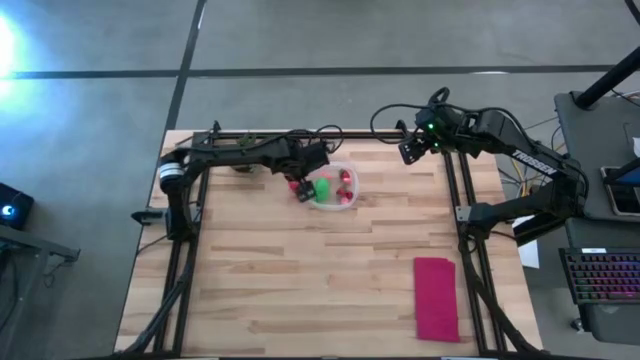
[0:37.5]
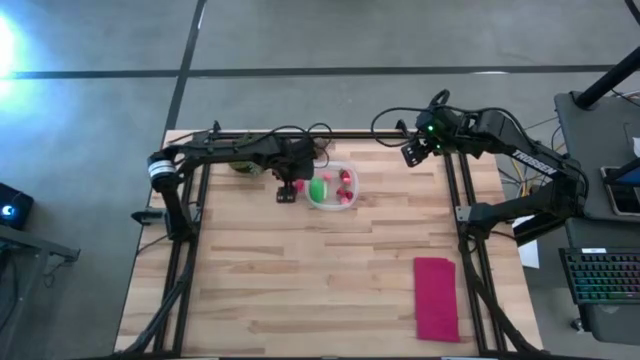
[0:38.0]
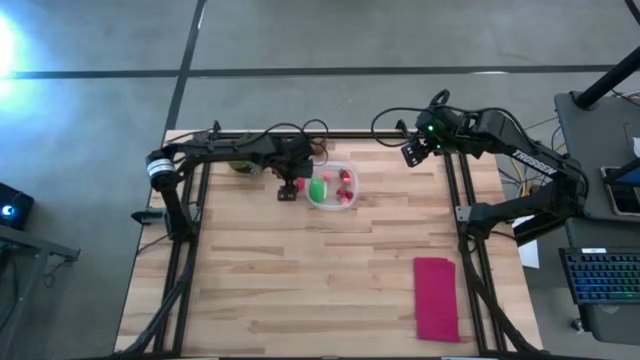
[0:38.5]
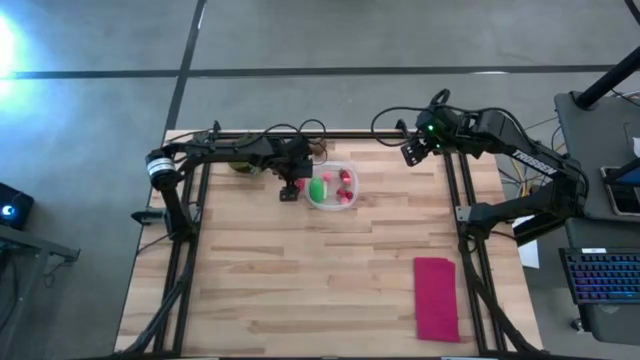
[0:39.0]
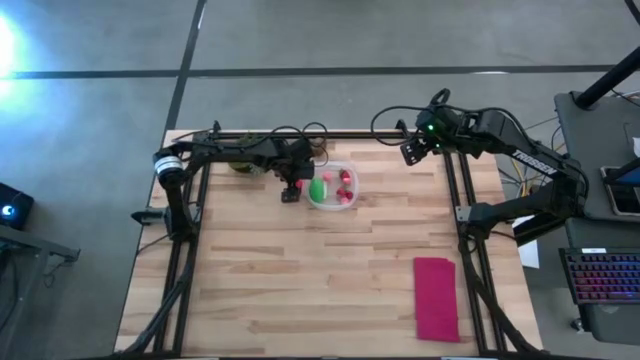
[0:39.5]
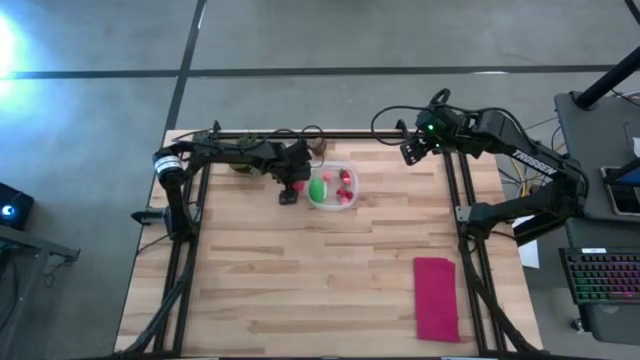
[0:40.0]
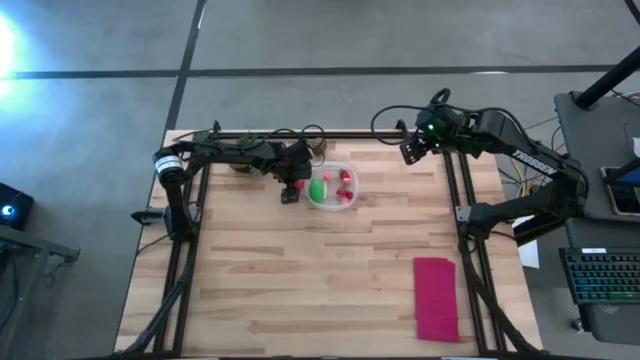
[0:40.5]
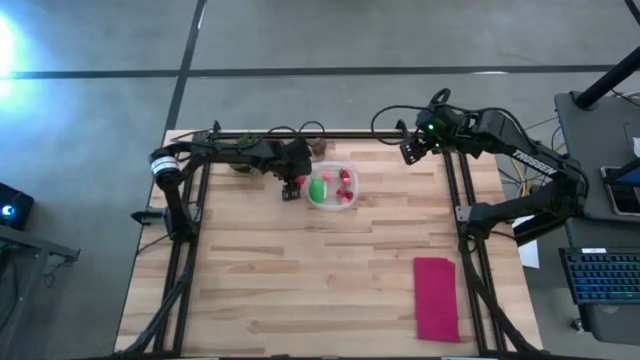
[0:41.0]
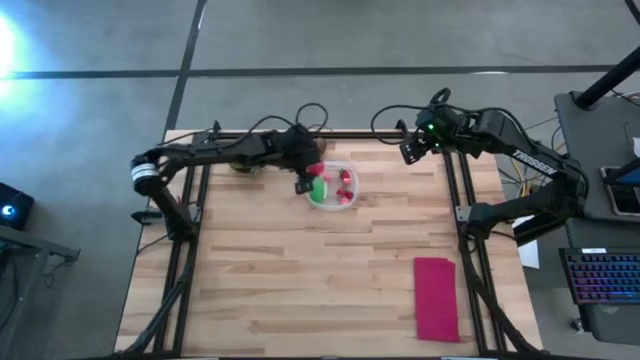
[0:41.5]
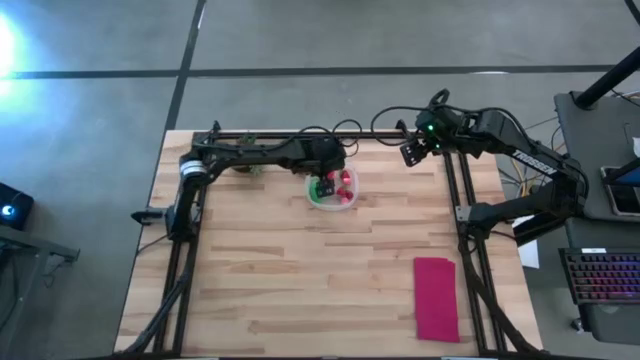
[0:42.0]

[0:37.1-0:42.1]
Task: Pick and placing Produce into tupperware
Put the tomato into the transparent bin

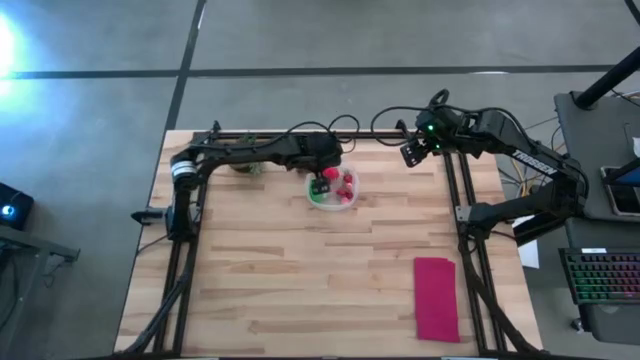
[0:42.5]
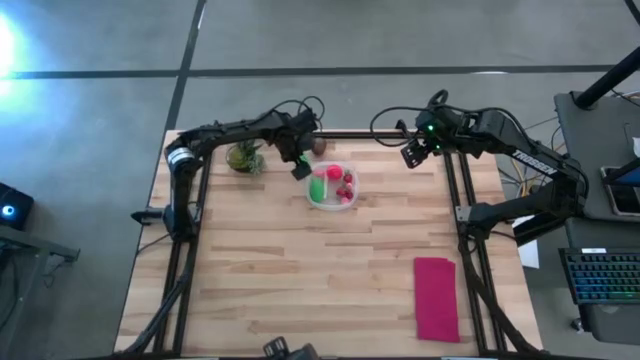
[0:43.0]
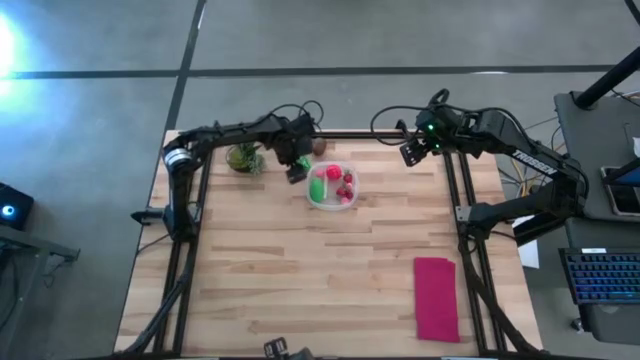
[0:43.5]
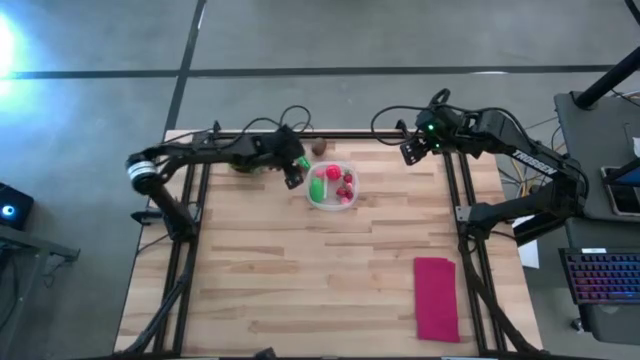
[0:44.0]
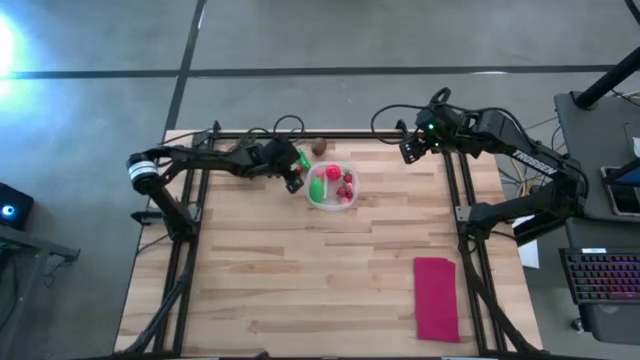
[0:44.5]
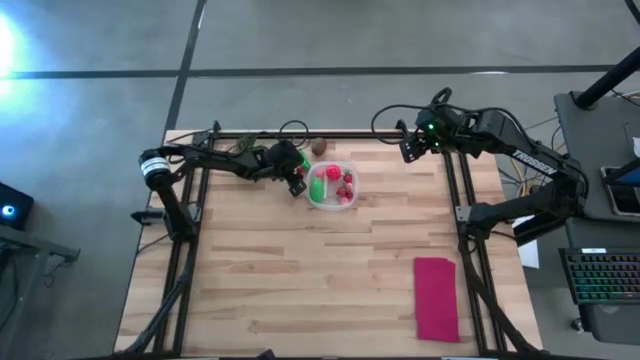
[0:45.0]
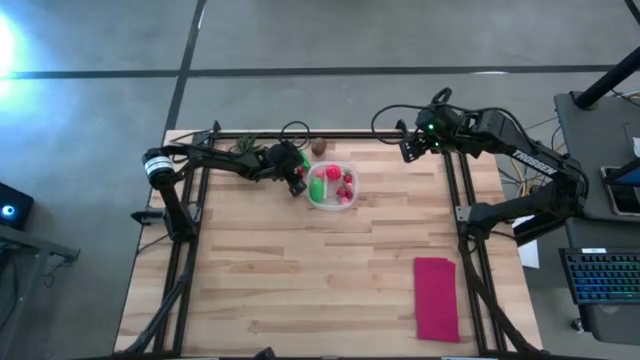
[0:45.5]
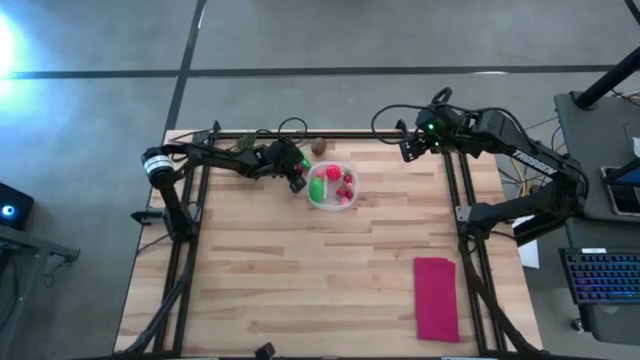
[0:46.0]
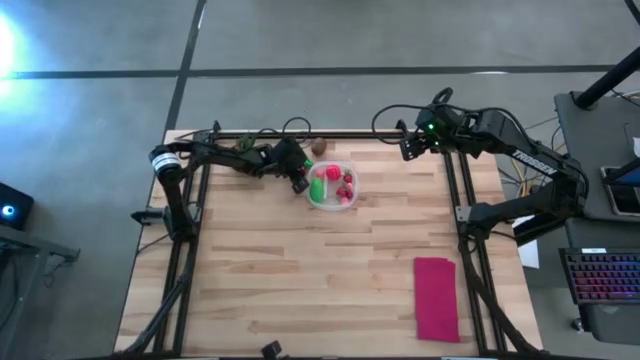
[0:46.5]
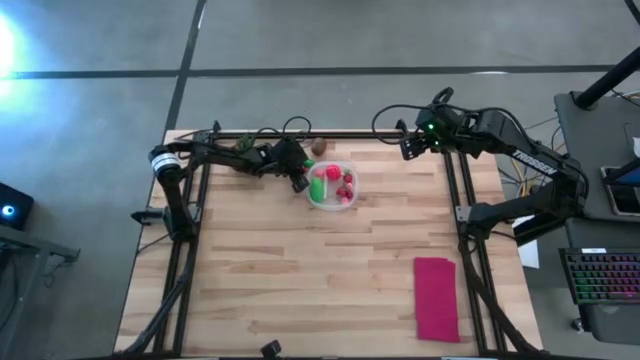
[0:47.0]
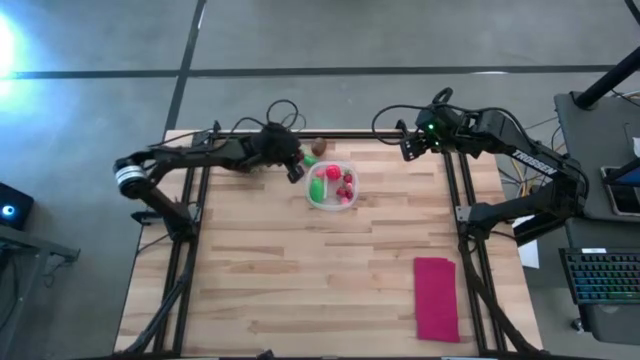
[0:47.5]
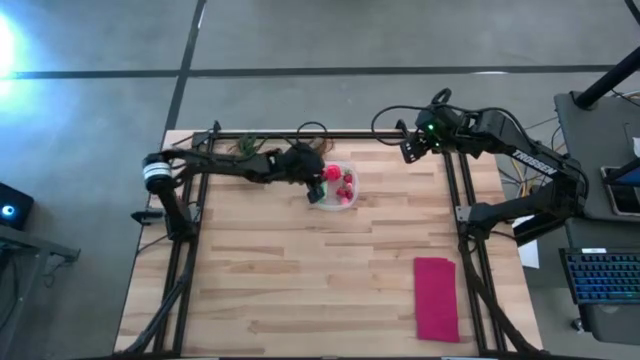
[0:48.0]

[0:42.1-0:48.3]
Put the cherry into the transparent bin

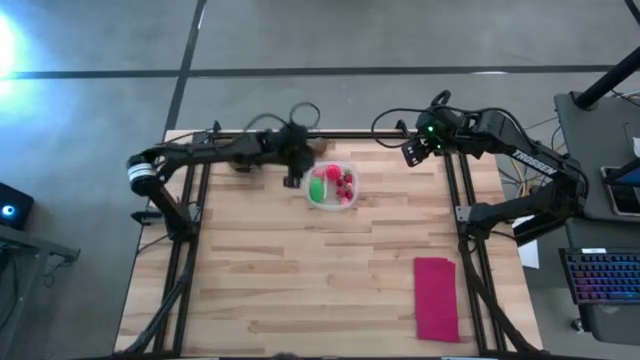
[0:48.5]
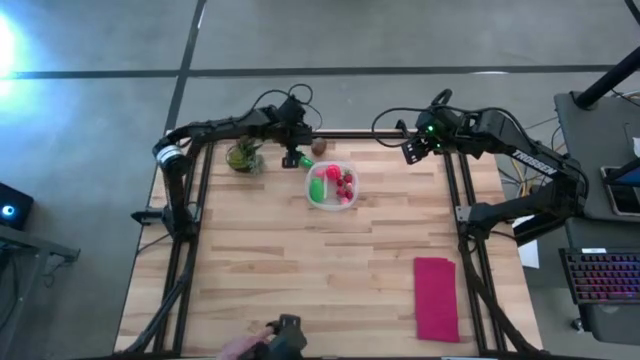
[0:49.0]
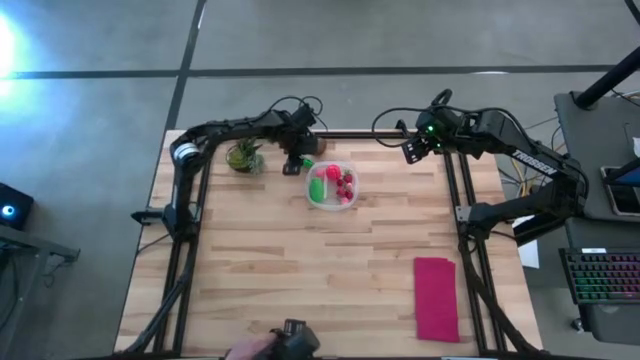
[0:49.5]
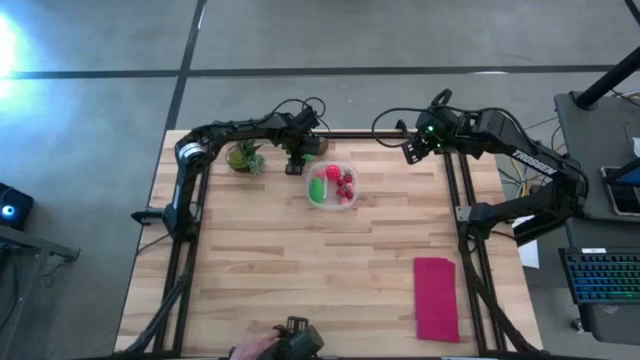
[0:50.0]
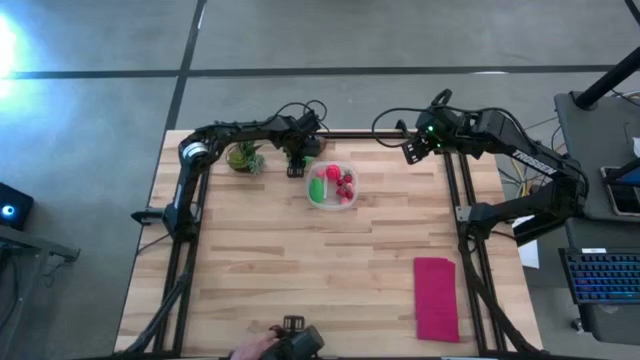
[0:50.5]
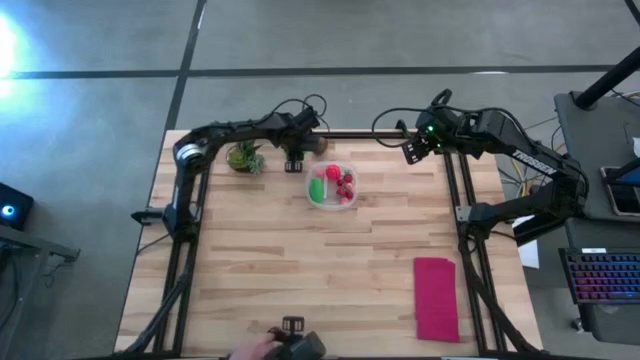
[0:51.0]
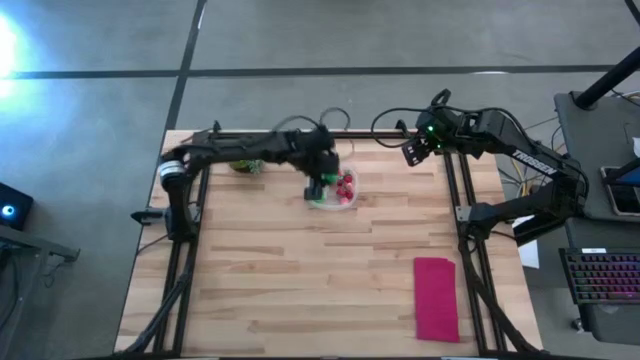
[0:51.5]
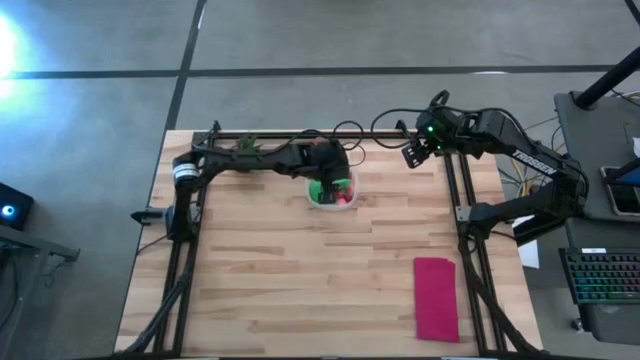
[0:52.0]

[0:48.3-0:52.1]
Put the green bean into the transparent bin

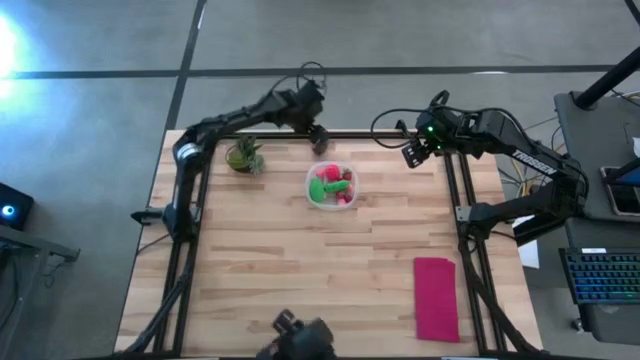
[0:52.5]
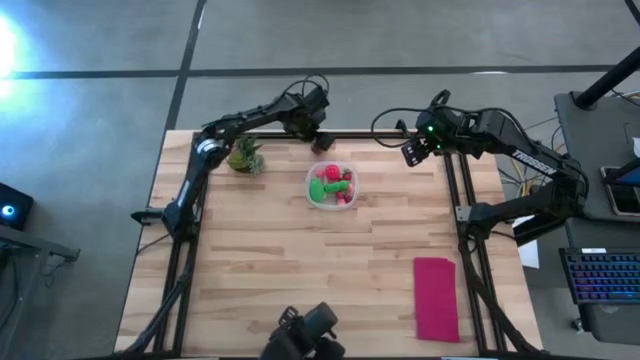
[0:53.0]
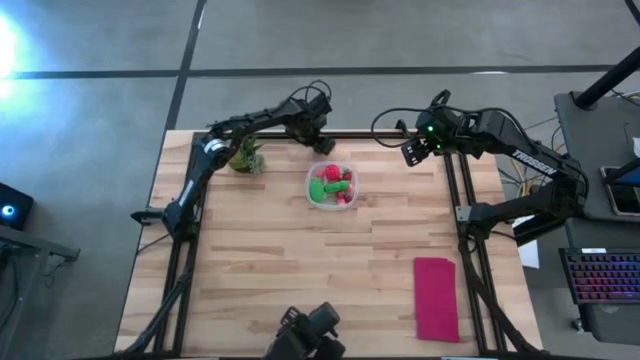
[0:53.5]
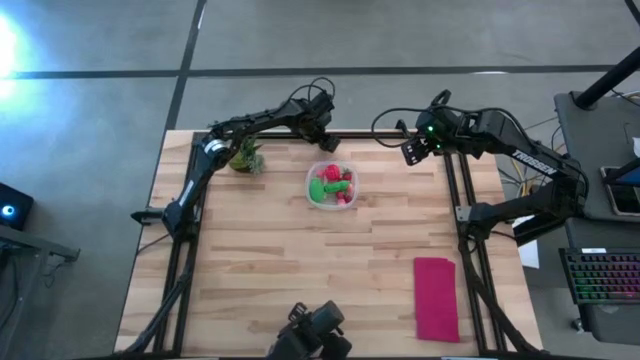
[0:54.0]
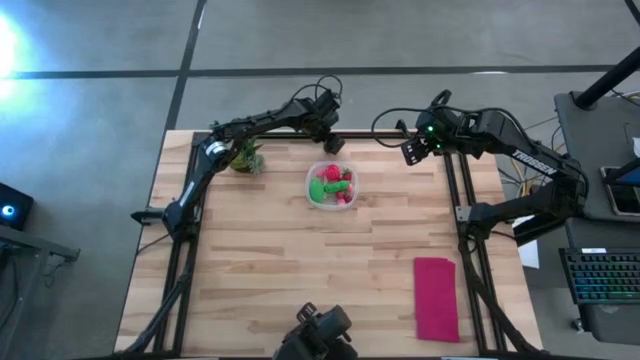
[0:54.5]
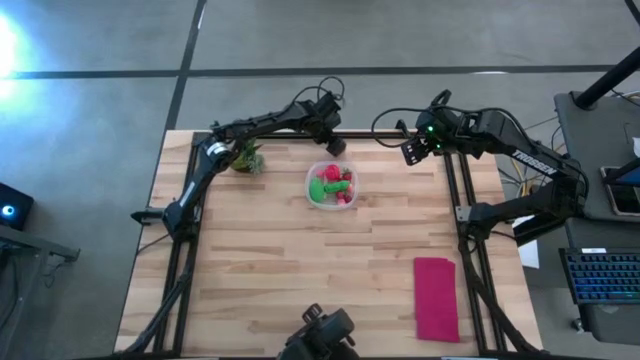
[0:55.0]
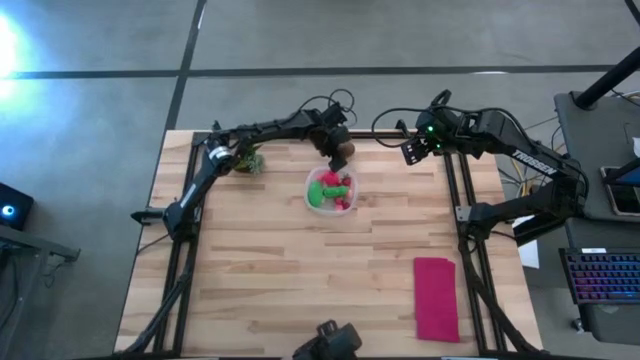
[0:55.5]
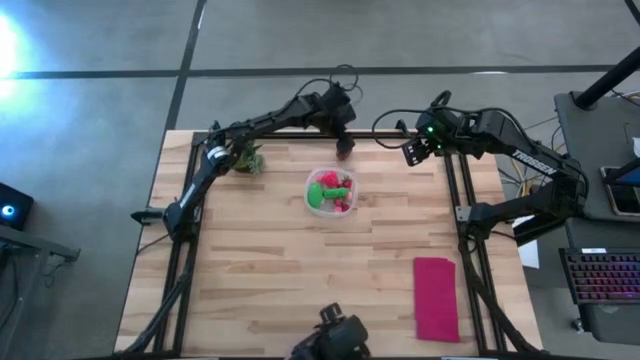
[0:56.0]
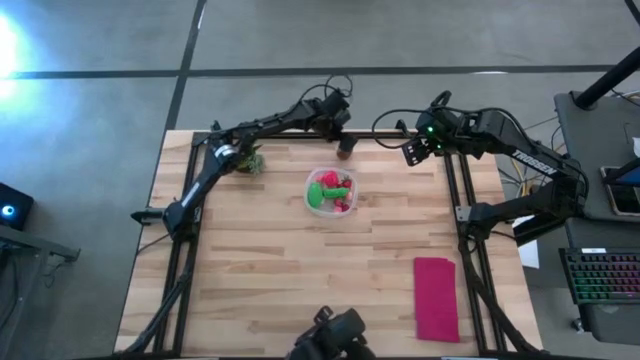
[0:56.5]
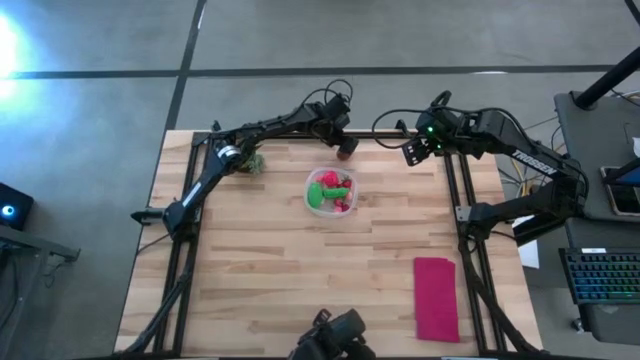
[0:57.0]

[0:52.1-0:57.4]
Put the kiwi into the transparent bin

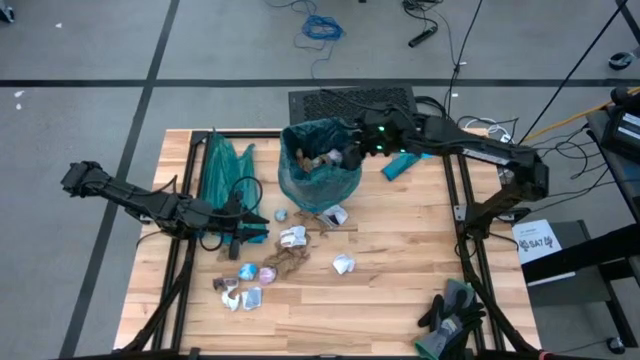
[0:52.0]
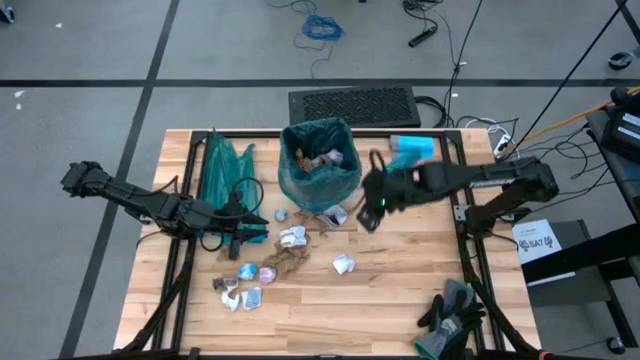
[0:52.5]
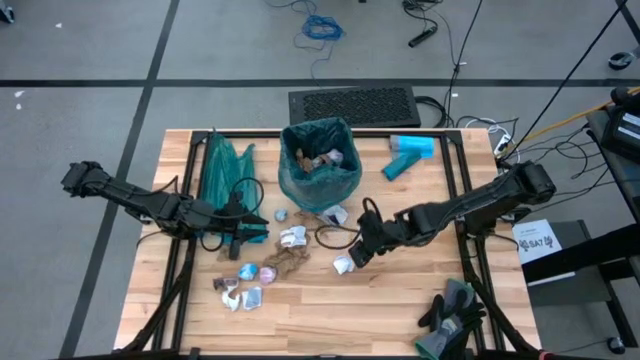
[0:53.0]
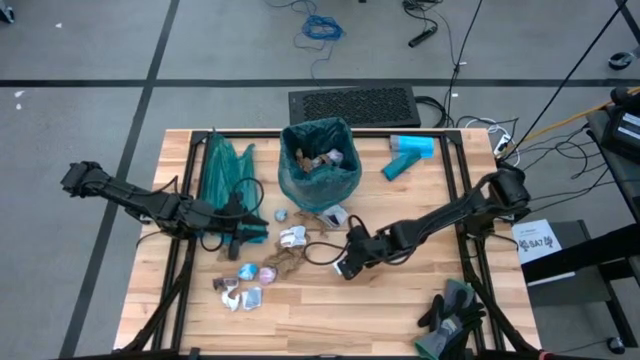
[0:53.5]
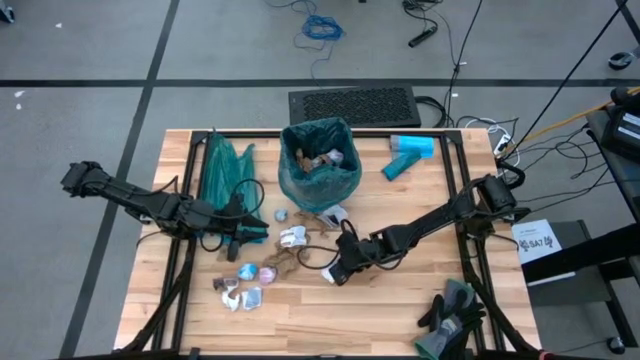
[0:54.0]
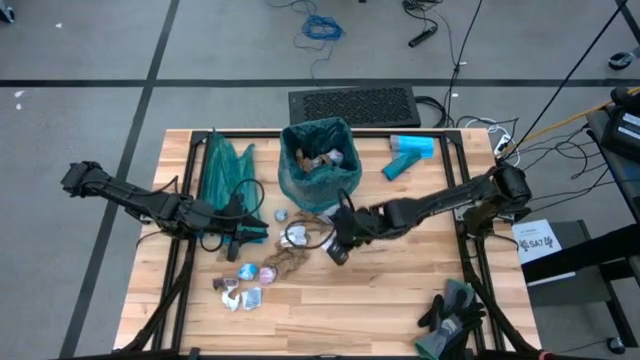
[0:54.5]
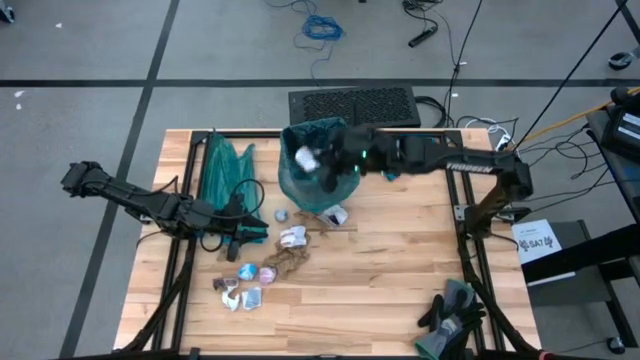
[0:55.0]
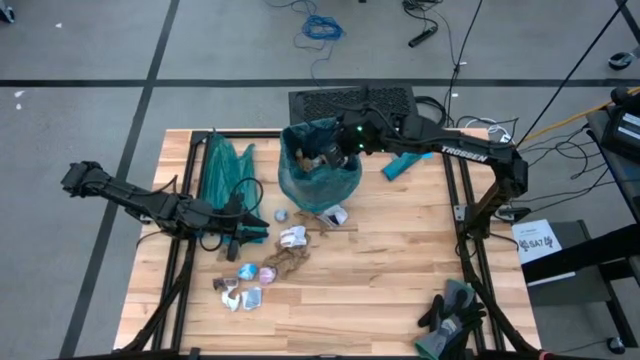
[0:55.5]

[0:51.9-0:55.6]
Task: place trash/remove bag and relplace
Put the white paper into the blue trash bag inside the black trash bin
